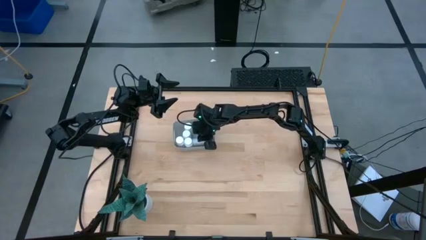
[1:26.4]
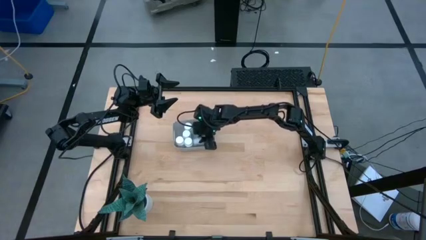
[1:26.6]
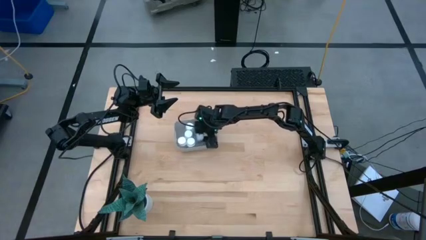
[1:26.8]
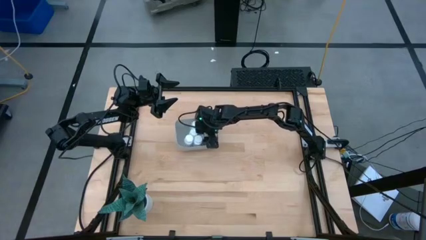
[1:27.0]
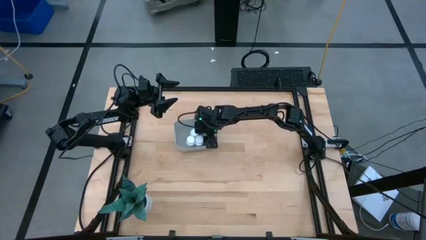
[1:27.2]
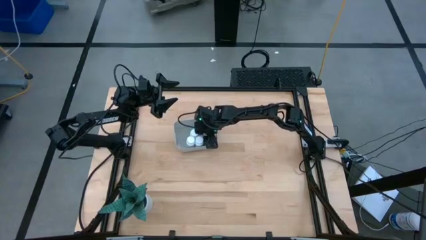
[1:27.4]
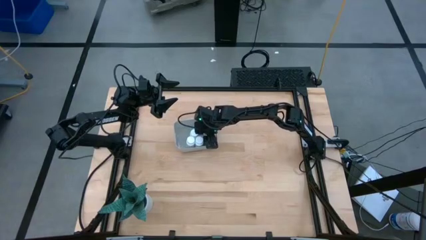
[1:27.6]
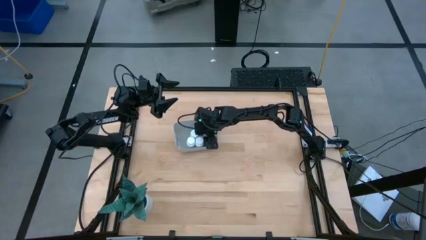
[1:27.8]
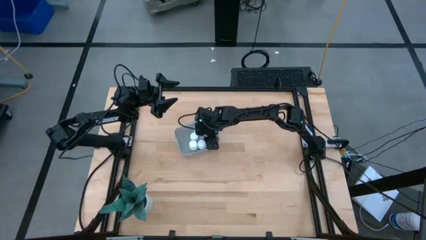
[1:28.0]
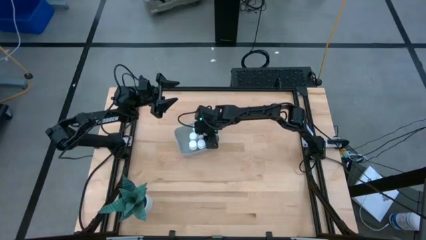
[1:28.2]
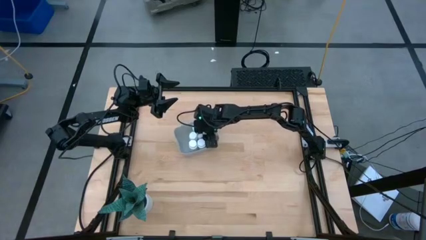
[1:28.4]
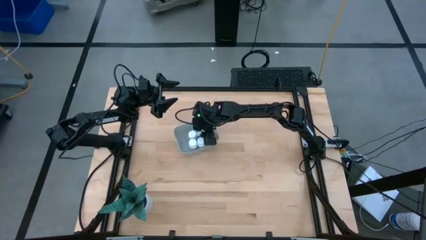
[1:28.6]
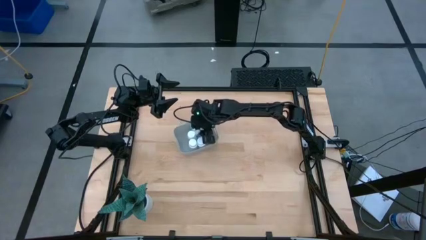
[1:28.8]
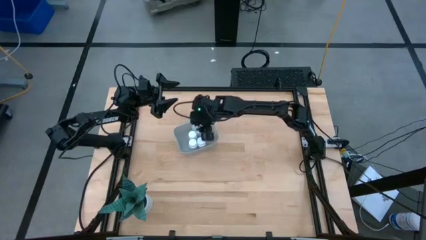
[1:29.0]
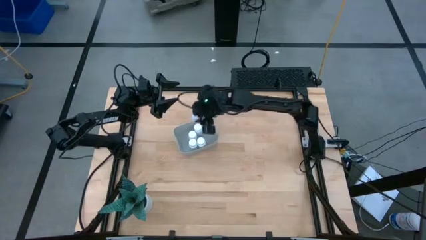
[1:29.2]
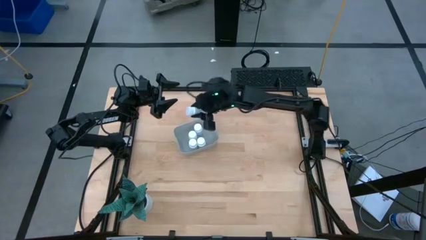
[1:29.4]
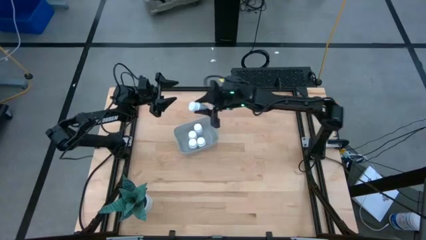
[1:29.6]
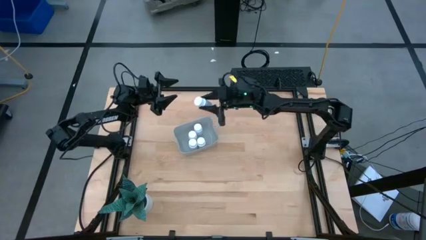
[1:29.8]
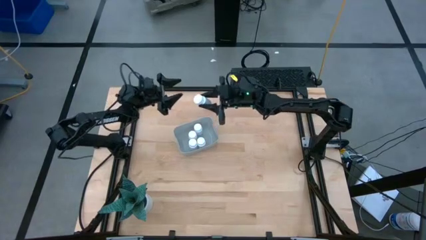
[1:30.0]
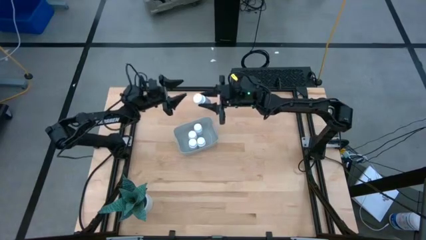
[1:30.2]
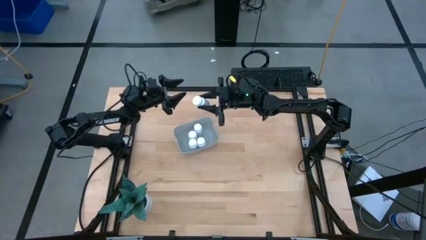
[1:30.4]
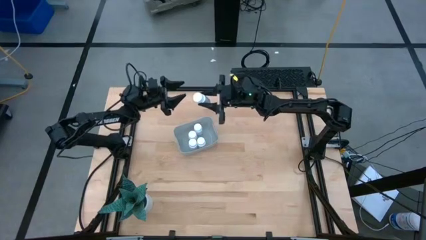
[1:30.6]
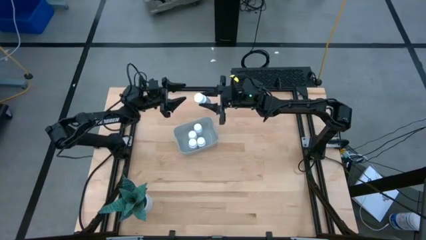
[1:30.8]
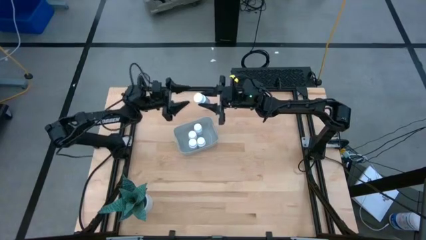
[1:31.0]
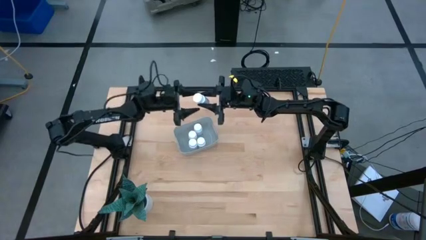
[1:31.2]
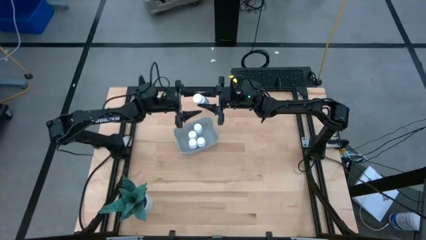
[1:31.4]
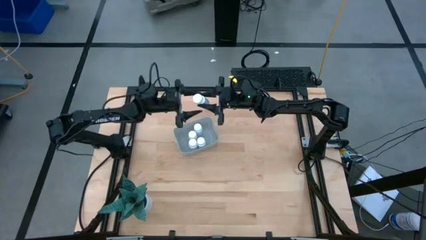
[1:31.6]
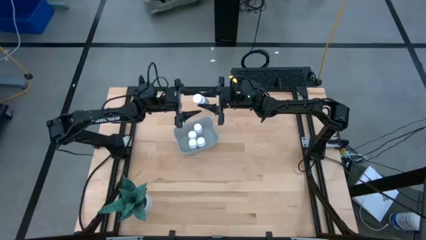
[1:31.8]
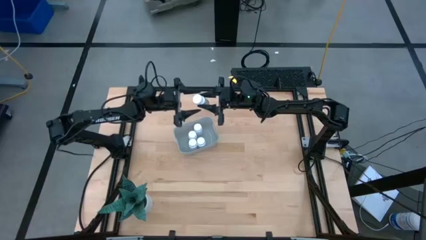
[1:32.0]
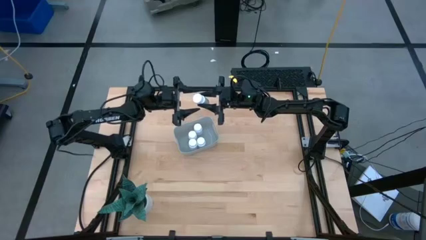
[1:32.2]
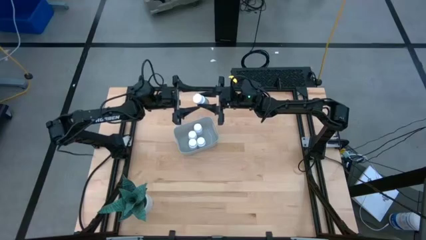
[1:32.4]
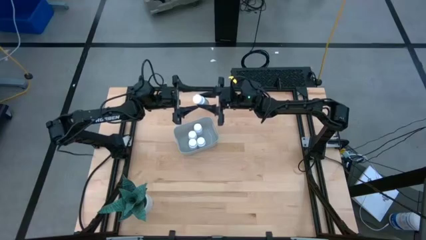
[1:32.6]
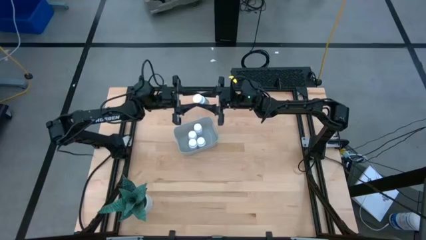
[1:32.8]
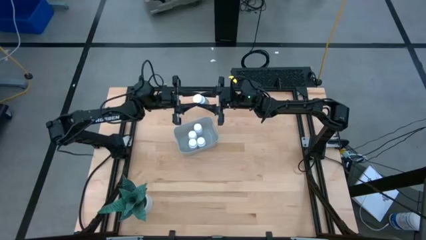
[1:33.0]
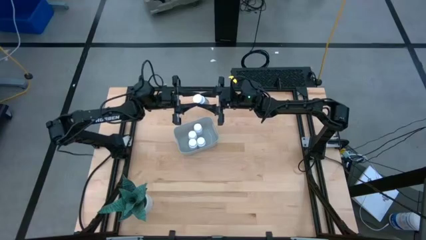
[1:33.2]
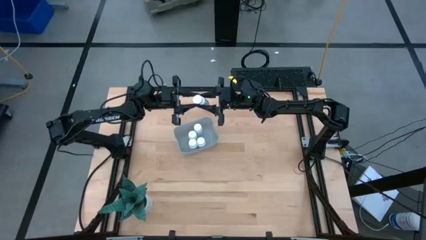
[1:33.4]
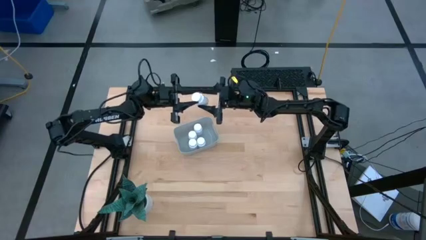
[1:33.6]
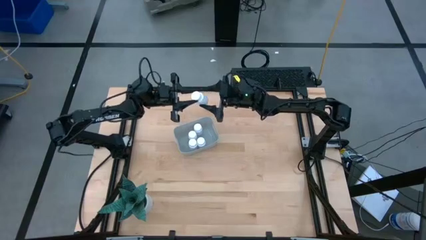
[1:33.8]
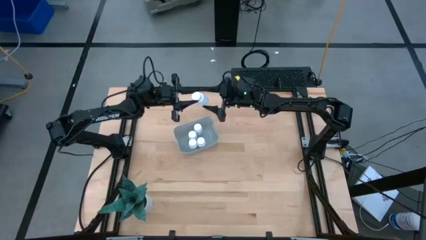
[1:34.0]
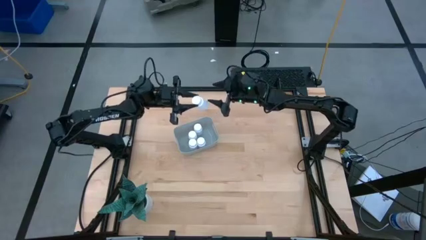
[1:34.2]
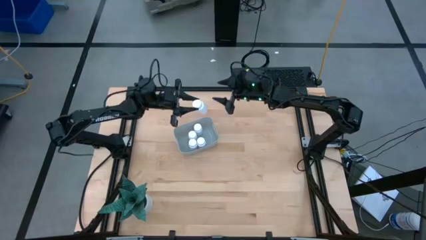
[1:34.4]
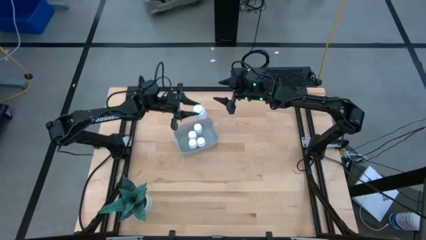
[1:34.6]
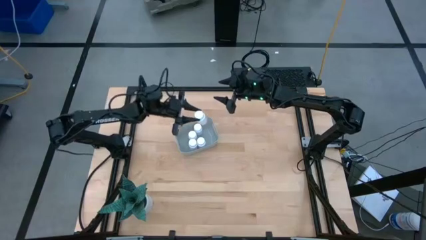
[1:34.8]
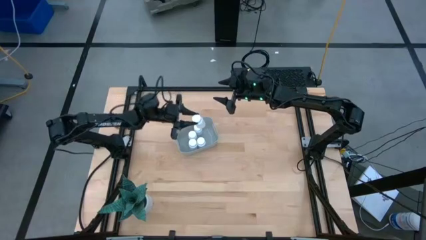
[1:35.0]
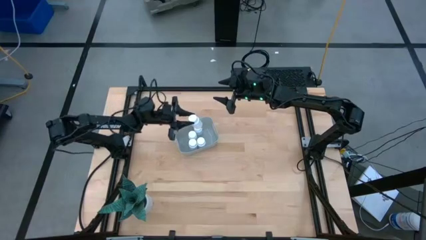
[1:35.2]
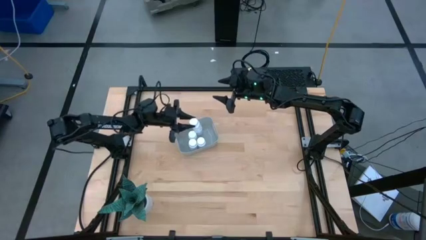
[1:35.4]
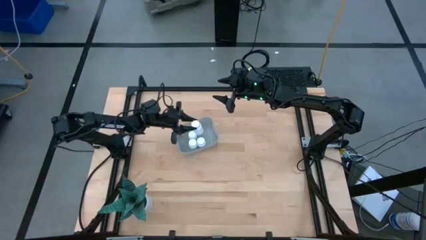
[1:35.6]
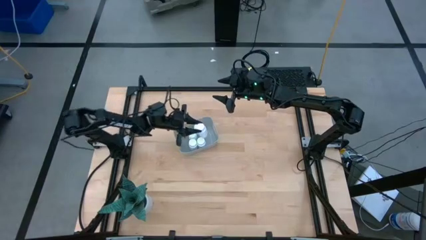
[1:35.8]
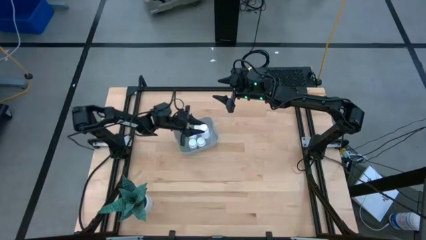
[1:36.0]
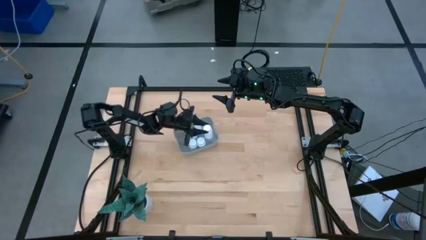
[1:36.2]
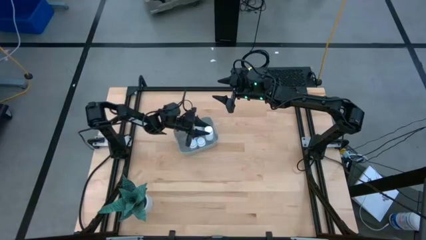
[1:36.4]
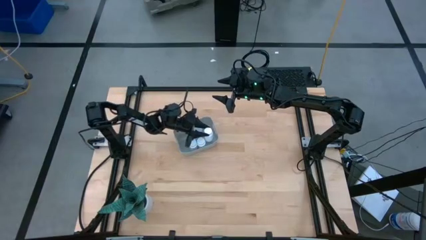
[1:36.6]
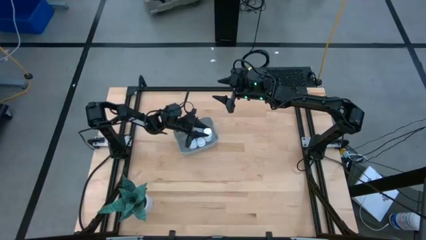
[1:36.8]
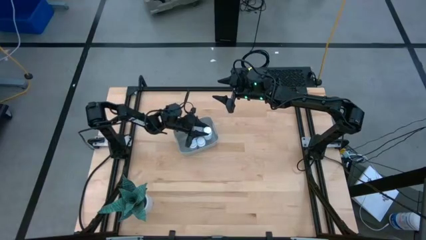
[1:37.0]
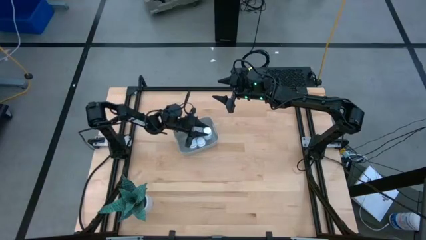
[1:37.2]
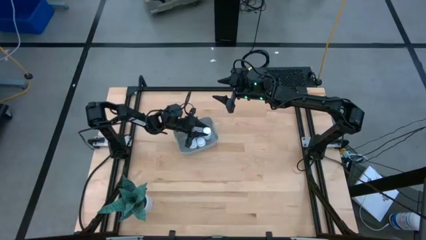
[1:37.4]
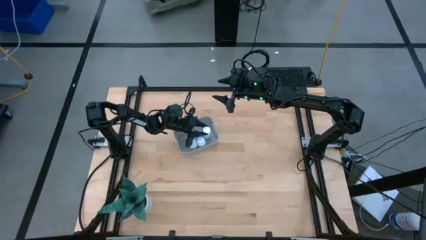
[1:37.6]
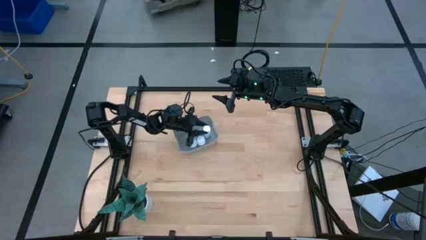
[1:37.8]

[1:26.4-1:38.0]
Task: Pick and place pill bottles into a basket
Adjust the white pill bottle in the gray bin

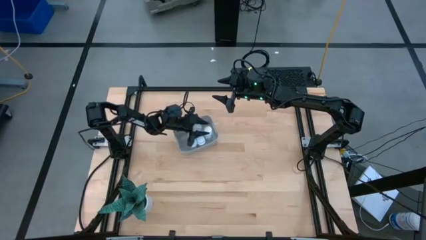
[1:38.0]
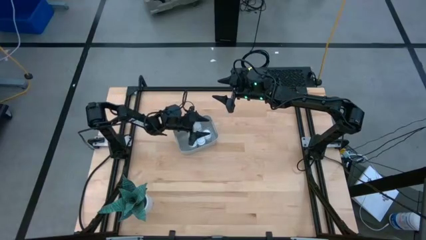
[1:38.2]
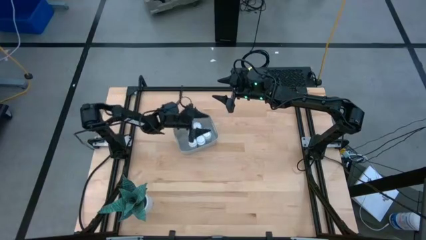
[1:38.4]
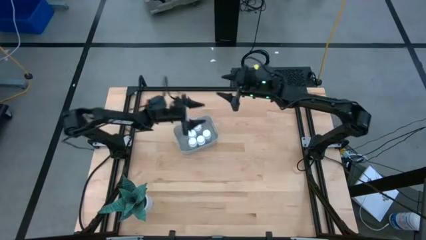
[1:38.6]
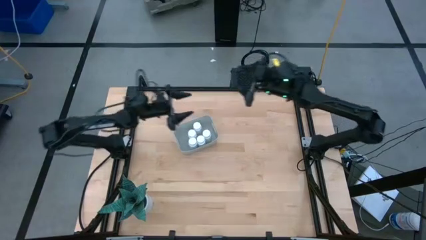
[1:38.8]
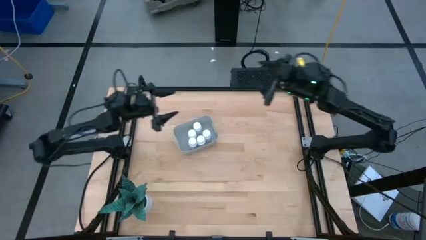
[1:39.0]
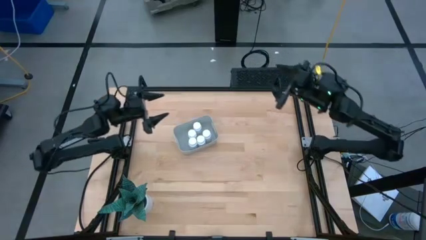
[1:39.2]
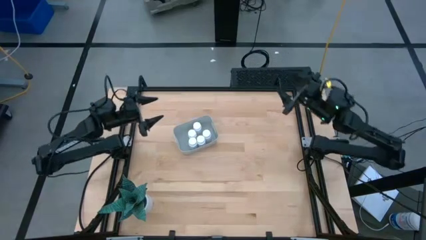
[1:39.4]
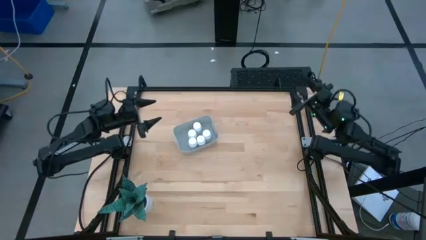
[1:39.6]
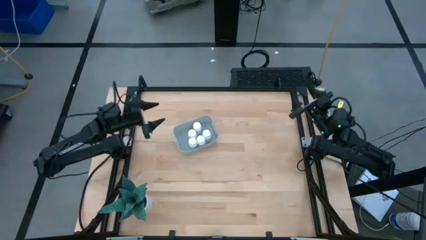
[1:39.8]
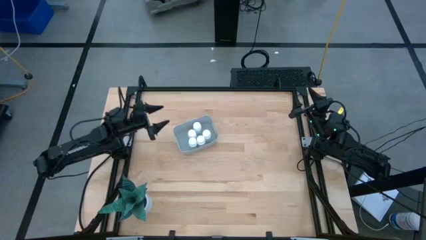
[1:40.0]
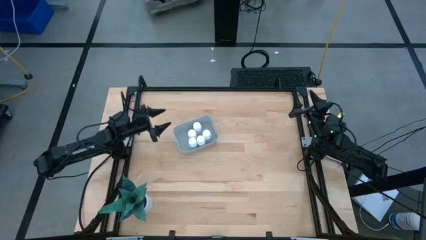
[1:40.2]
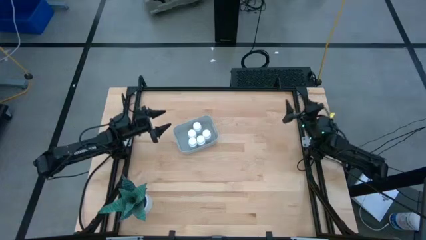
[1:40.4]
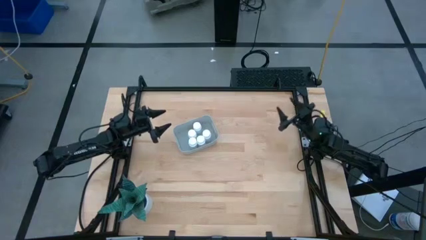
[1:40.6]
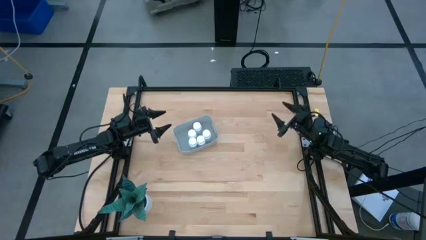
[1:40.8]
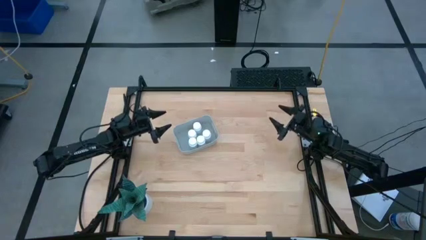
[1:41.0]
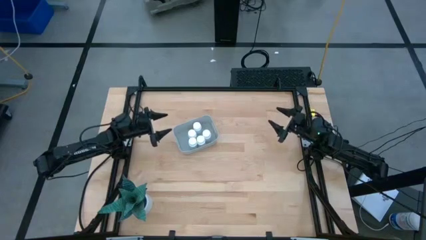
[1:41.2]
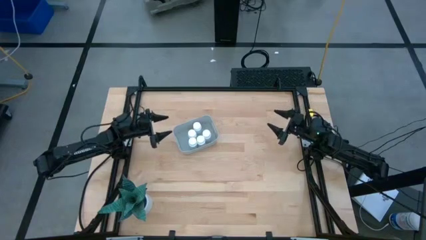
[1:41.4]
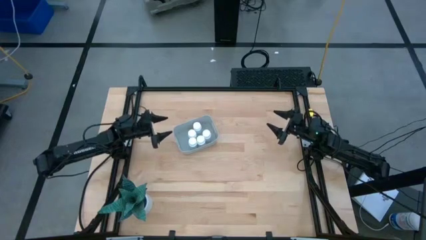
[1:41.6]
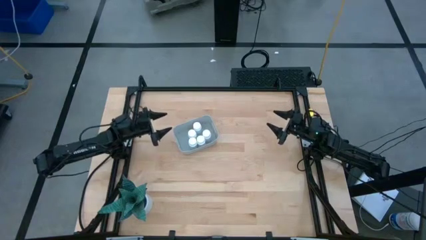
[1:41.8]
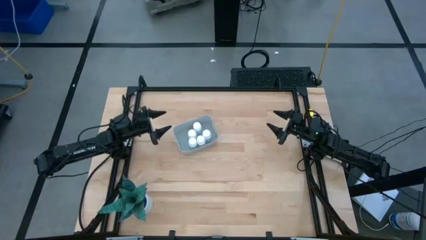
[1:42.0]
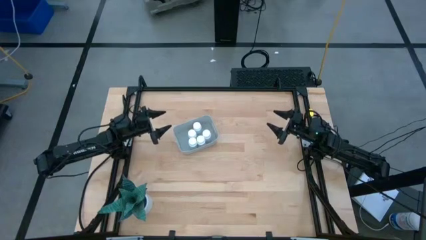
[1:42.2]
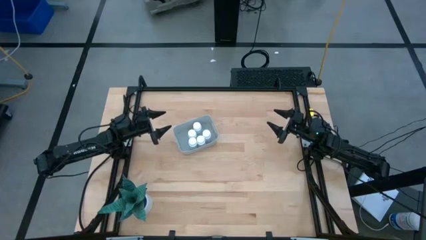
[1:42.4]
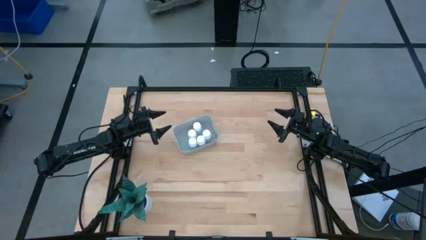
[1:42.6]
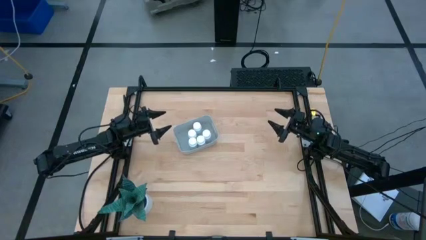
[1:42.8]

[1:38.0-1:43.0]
Return to Home Position

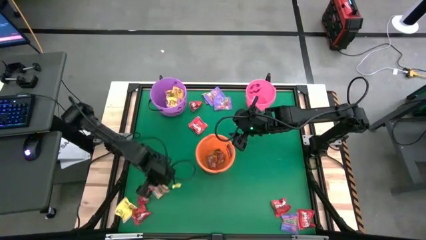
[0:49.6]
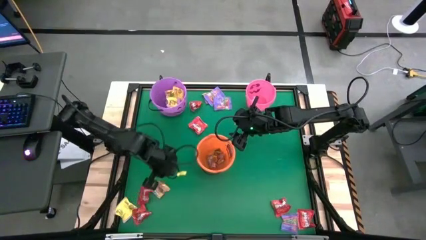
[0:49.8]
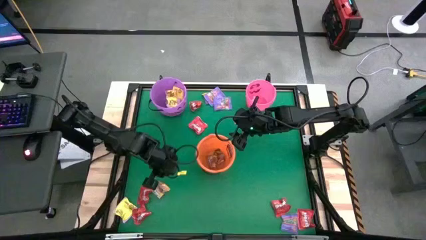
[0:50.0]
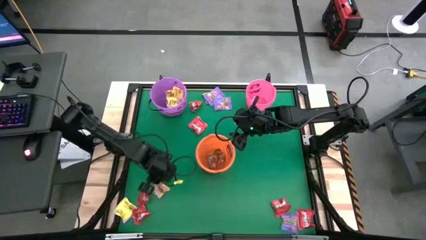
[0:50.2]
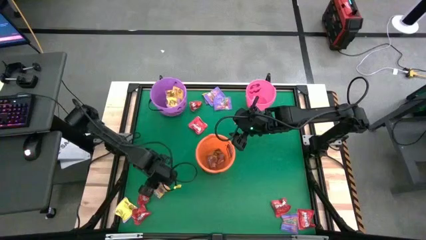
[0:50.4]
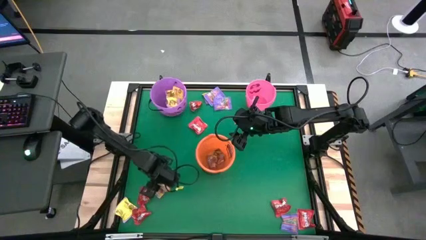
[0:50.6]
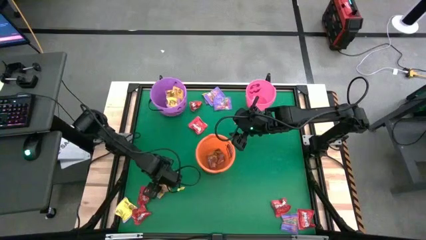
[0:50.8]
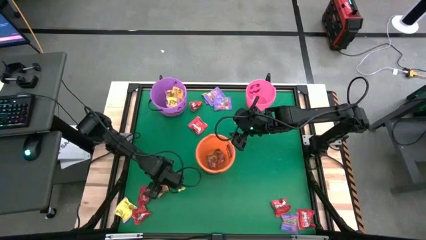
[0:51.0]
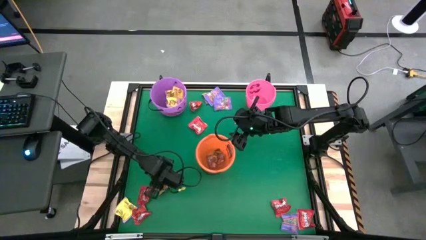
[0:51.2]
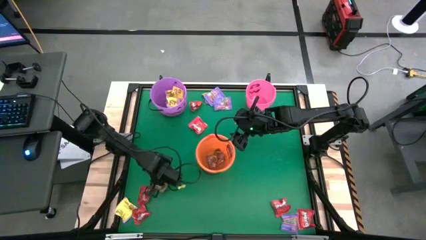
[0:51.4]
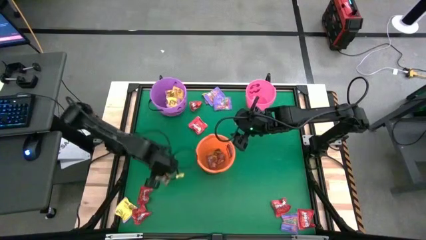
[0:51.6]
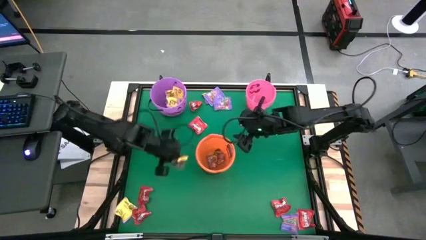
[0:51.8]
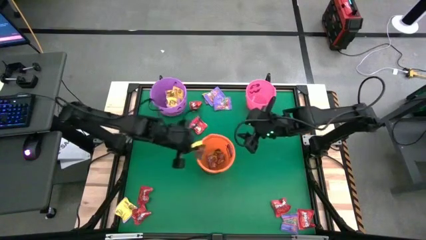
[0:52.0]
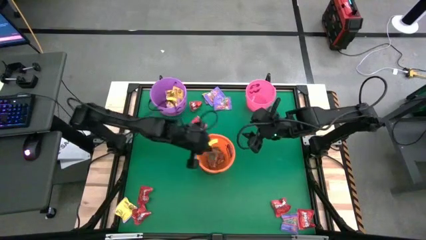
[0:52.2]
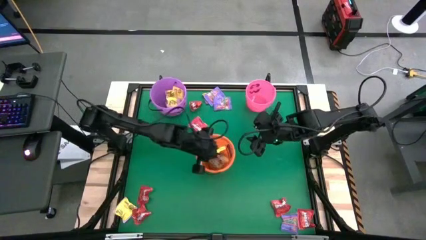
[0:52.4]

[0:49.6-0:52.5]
Task: Sort candy by brand, put in halloween buckets
Put the yellow-red candy into the orange bucket
